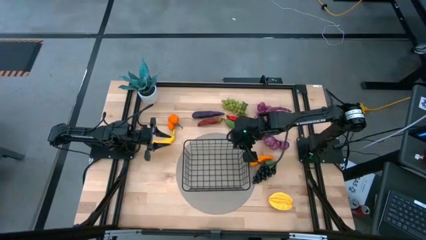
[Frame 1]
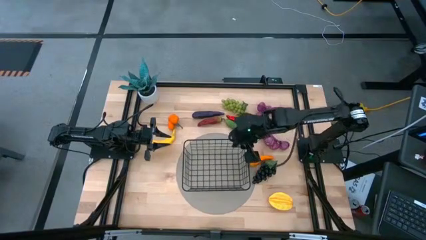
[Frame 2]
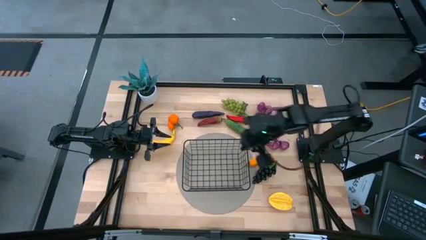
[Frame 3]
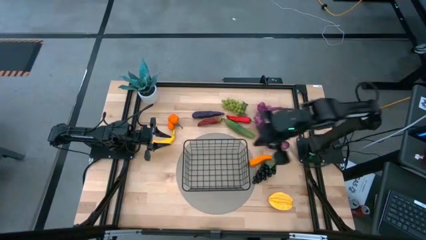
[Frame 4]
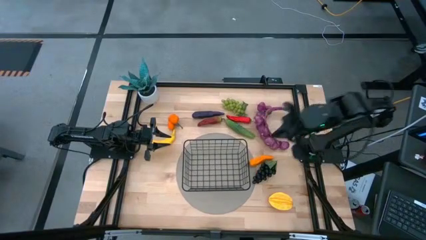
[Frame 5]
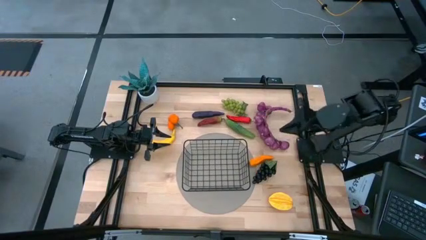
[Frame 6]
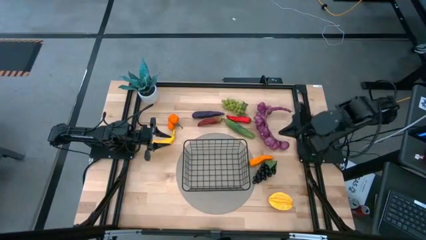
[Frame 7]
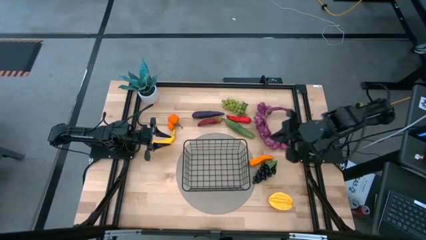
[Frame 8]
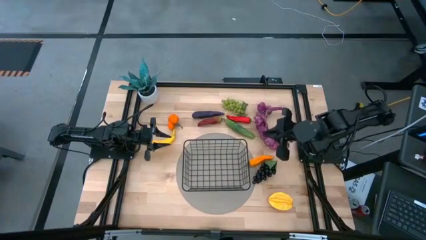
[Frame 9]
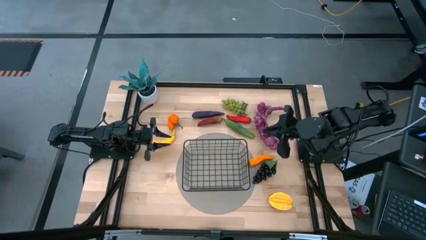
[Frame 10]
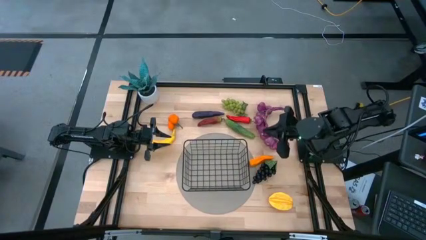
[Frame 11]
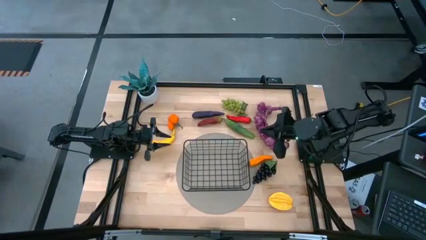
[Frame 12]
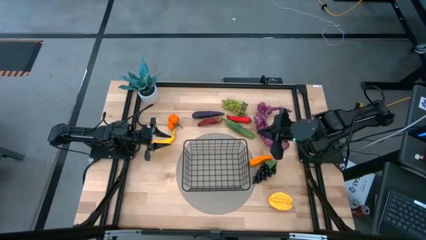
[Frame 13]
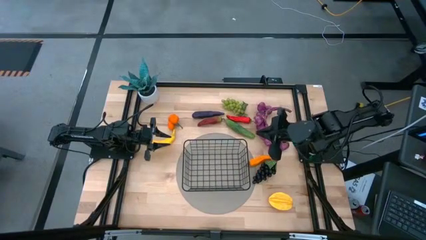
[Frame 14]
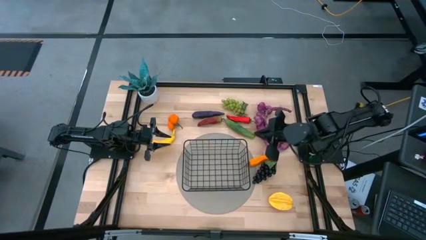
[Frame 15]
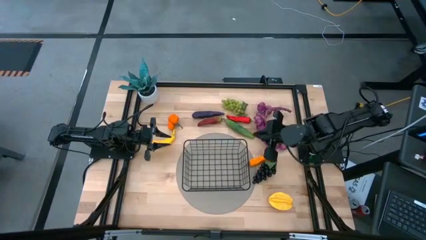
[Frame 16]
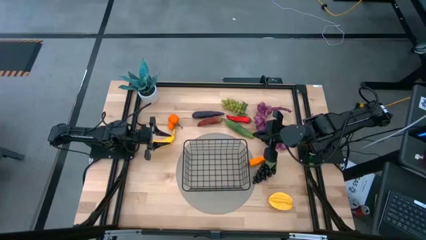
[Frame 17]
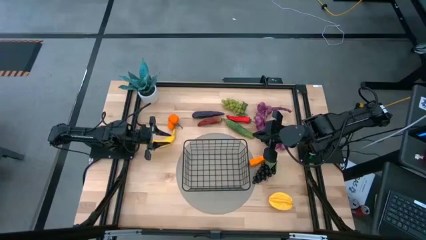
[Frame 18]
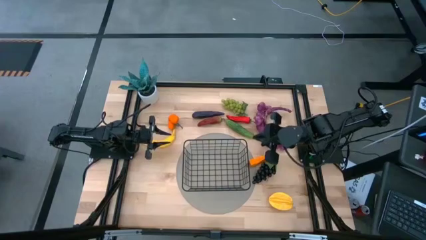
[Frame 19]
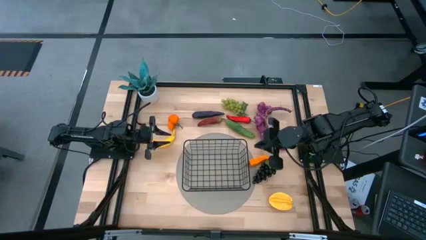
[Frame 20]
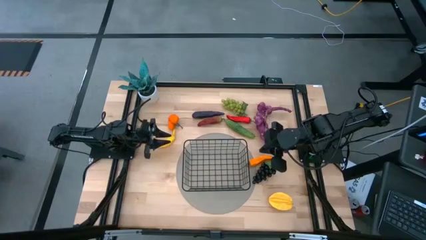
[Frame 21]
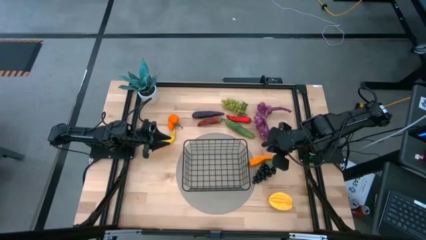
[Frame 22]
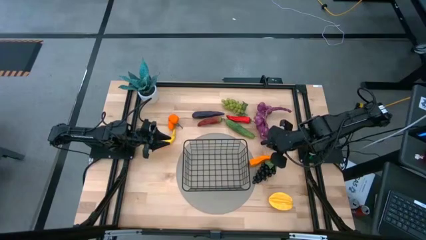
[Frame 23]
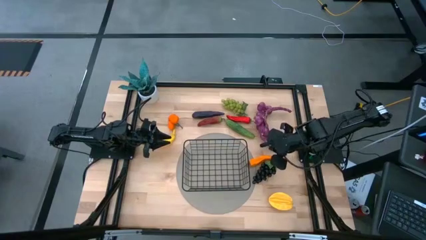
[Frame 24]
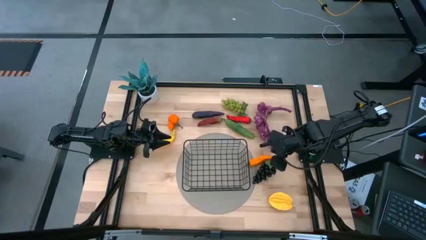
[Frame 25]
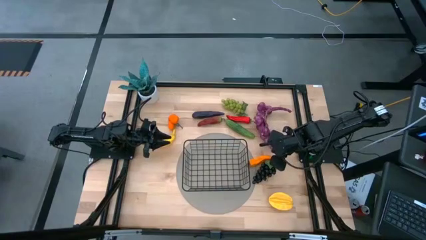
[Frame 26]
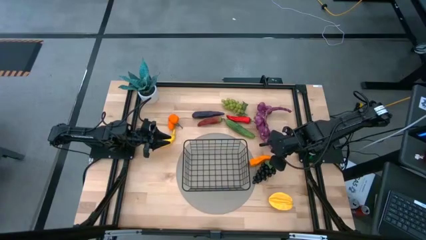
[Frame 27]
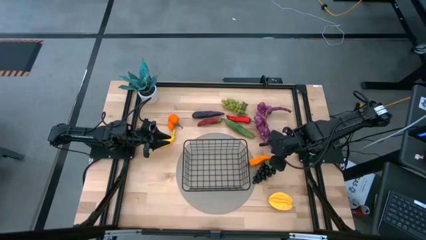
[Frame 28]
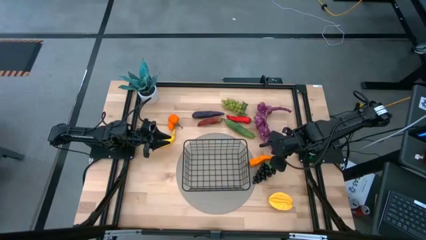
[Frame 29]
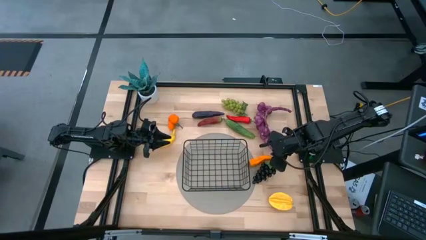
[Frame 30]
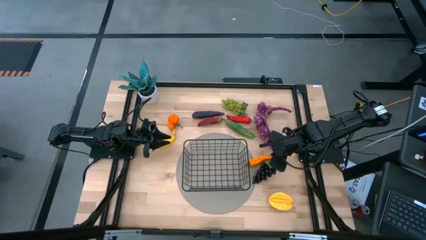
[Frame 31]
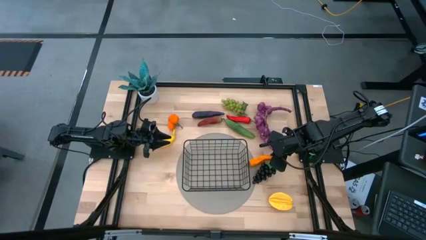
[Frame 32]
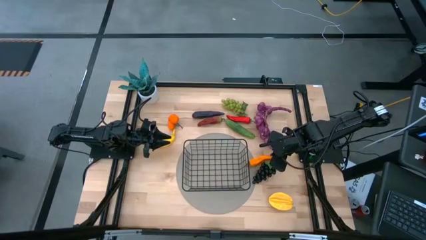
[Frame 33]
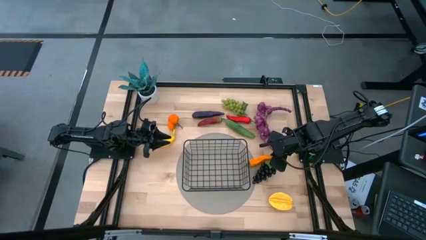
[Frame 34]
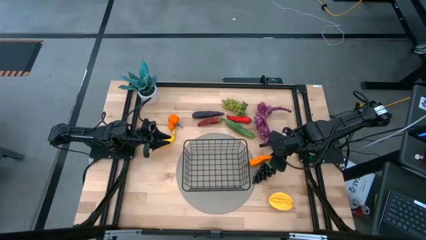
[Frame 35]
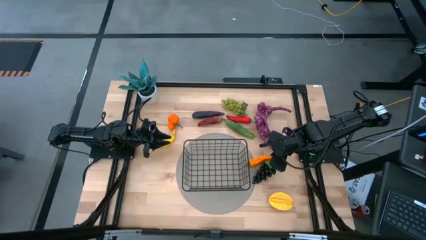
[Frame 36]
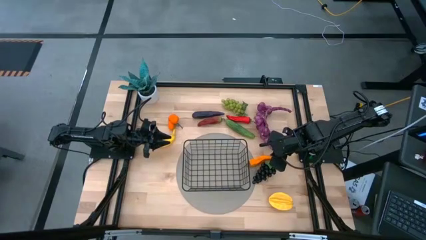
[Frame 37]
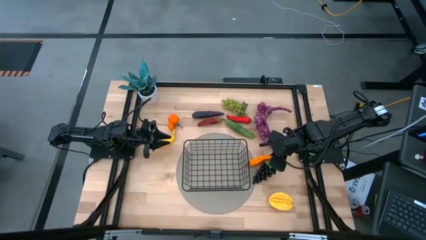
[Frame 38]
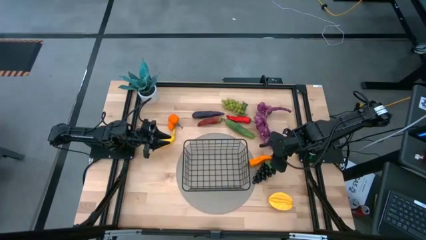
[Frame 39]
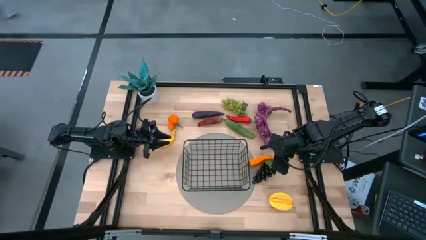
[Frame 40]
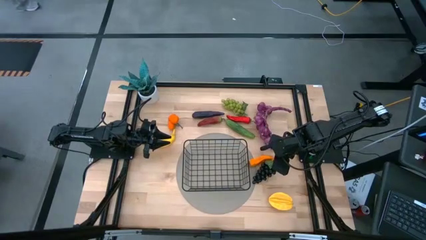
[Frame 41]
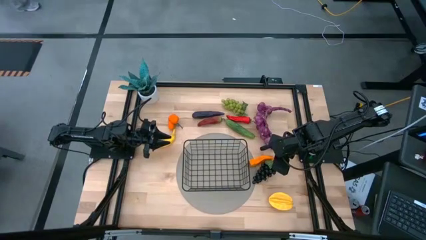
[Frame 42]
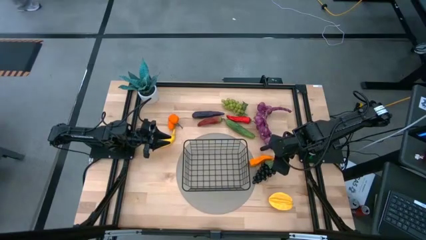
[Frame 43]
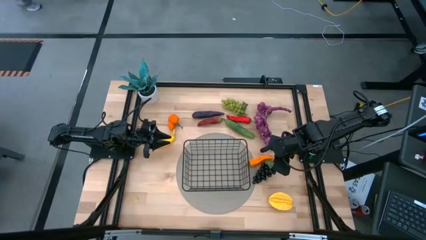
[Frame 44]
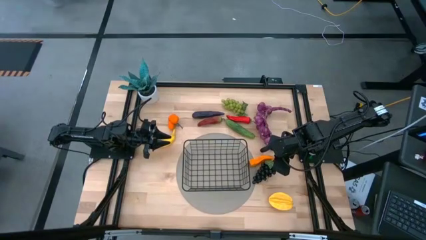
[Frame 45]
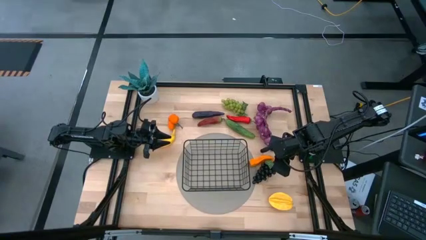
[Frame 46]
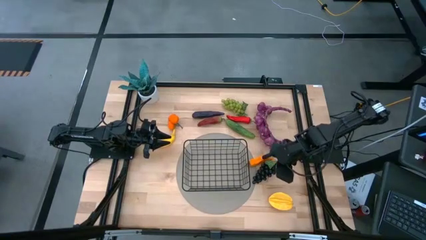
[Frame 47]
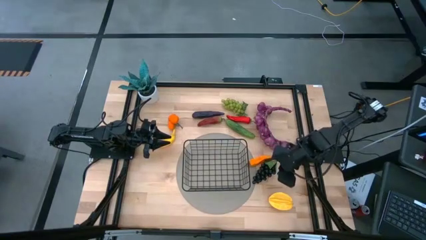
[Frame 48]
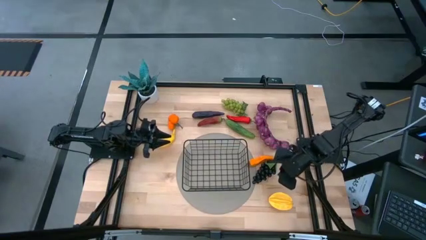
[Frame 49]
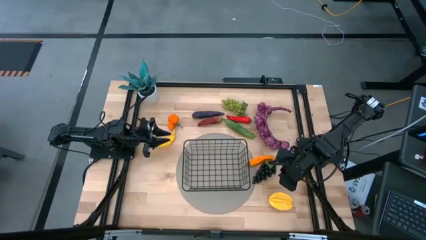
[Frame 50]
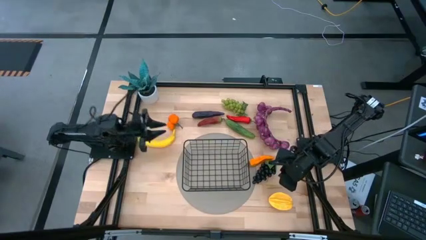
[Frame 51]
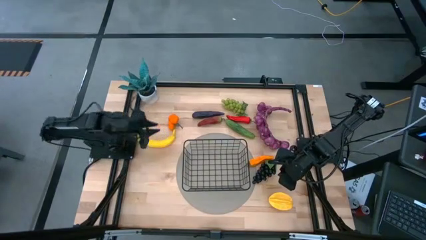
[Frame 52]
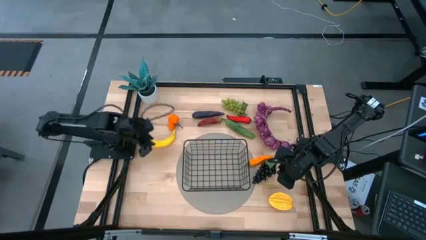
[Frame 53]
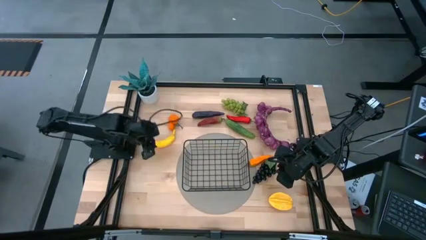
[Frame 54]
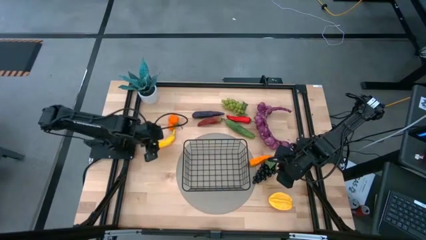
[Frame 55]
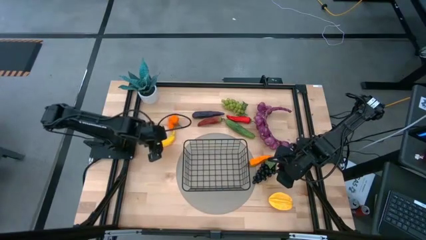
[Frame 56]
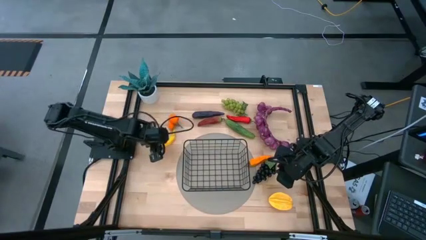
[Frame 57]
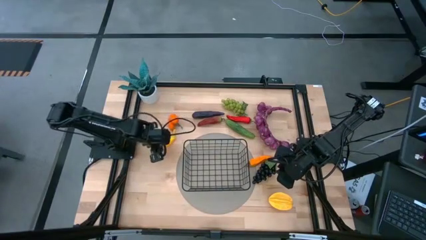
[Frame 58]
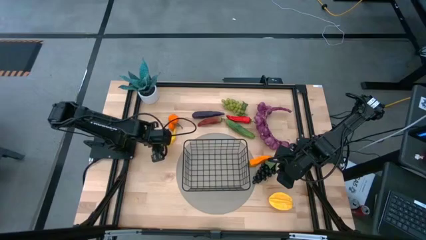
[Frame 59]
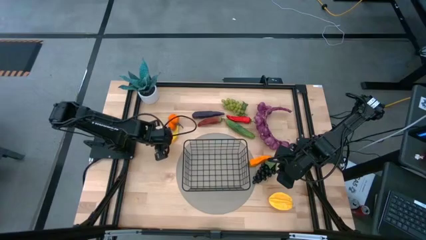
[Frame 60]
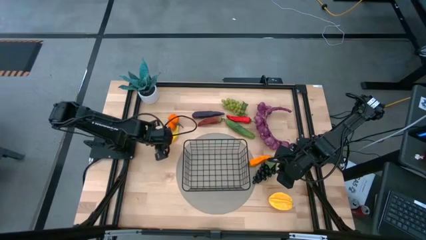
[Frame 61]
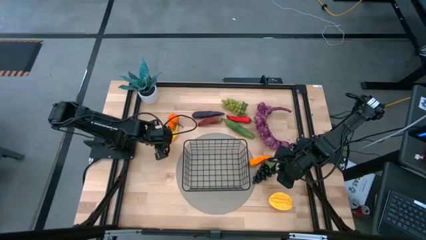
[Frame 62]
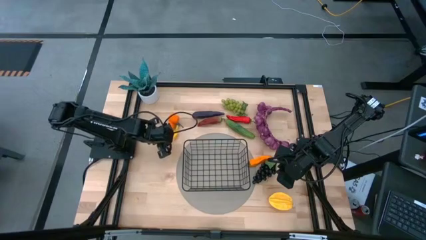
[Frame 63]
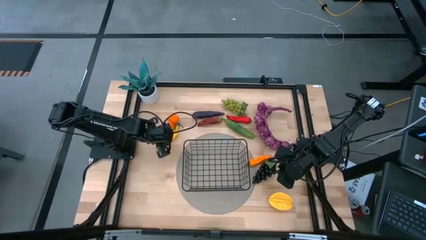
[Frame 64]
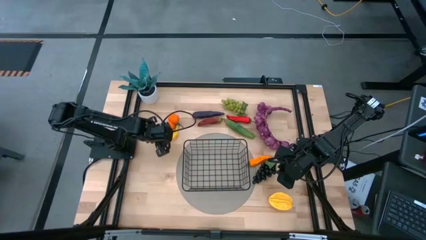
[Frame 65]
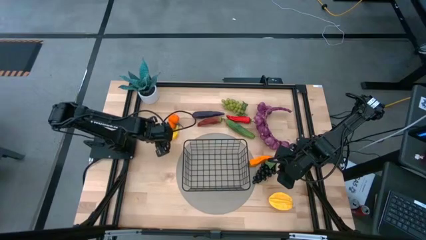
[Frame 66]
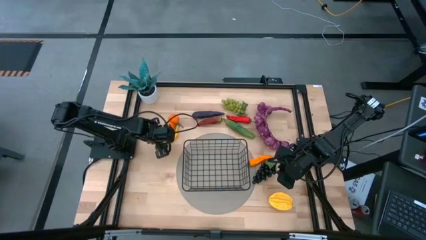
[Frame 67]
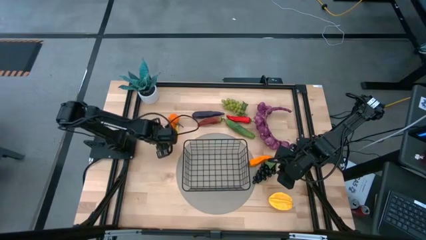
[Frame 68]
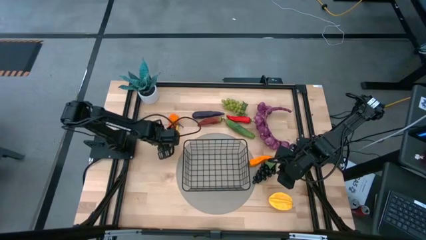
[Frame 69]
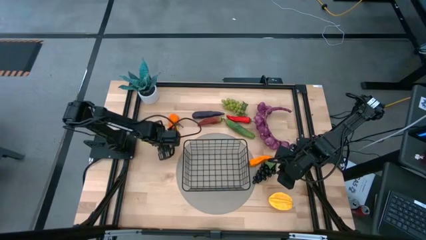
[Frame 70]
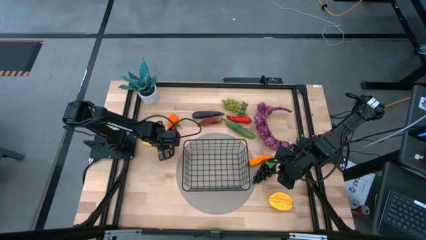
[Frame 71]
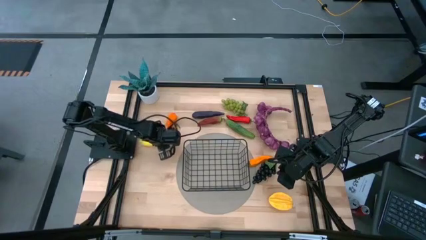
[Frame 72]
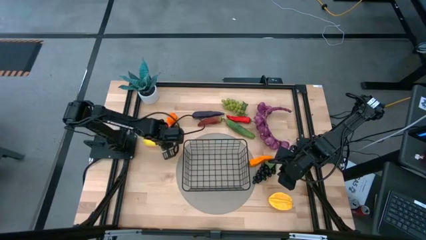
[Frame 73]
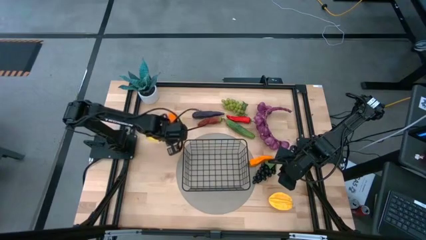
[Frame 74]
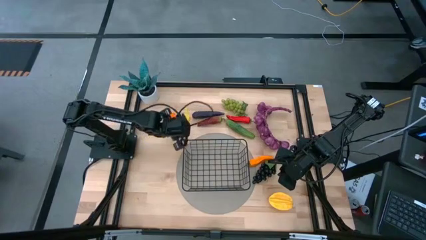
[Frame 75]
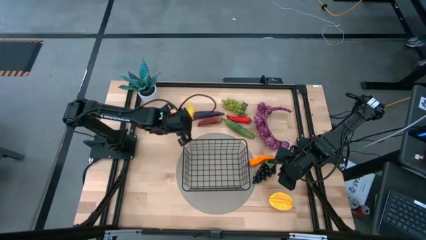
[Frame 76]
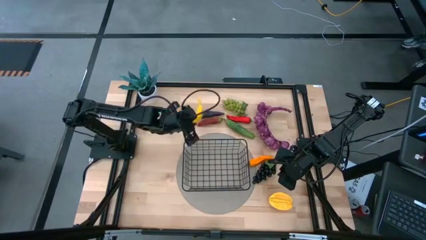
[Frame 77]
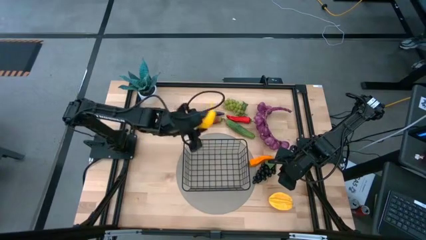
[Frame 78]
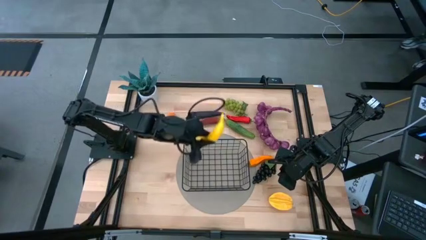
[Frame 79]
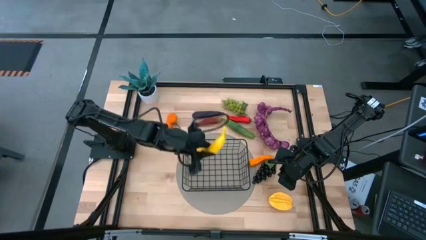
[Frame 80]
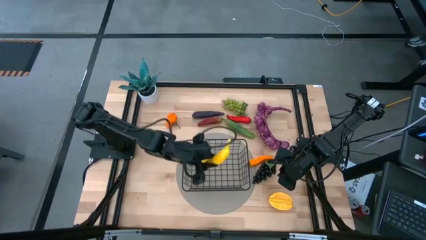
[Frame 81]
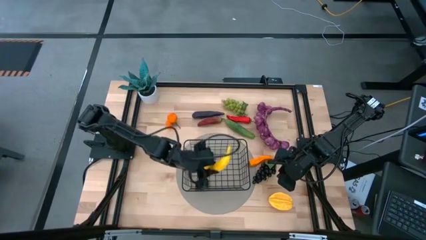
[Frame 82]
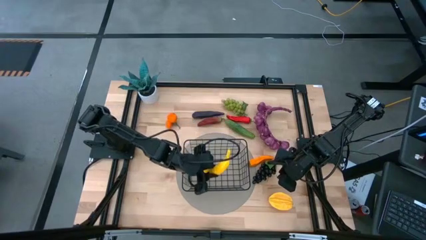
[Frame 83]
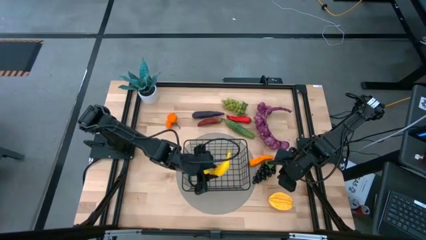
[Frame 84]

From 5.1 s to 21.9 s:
Task: Build produce basket
Put the yellow banana into the black wire basket
